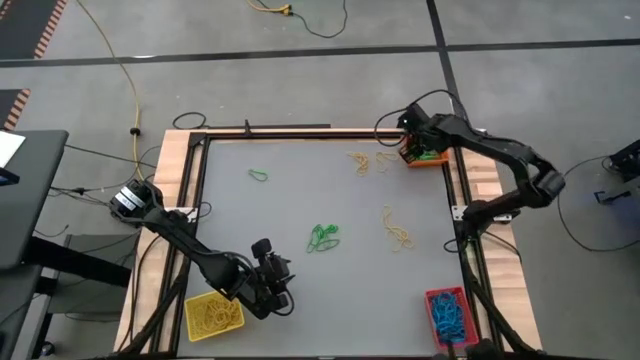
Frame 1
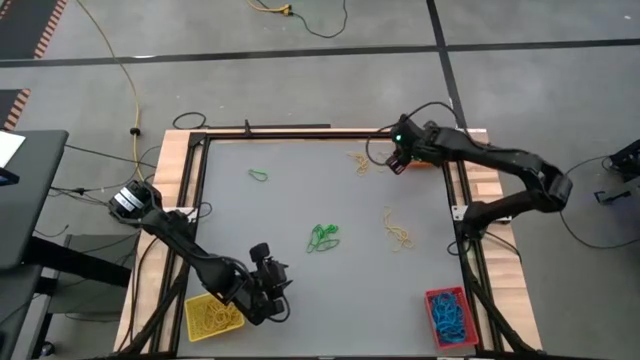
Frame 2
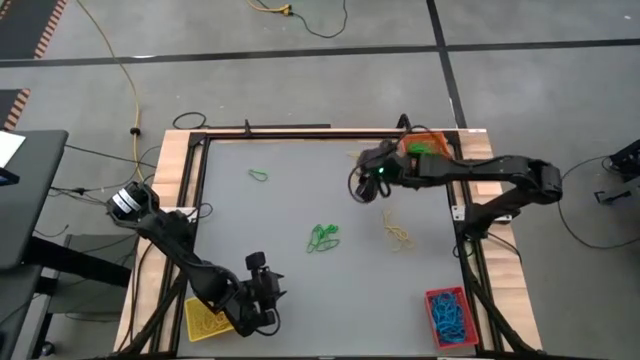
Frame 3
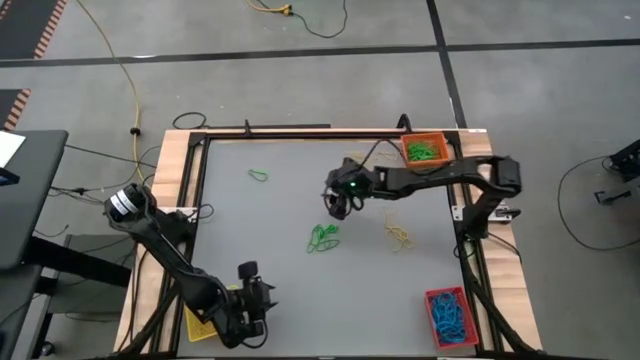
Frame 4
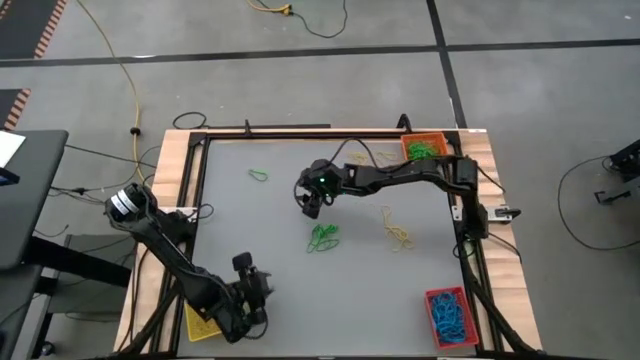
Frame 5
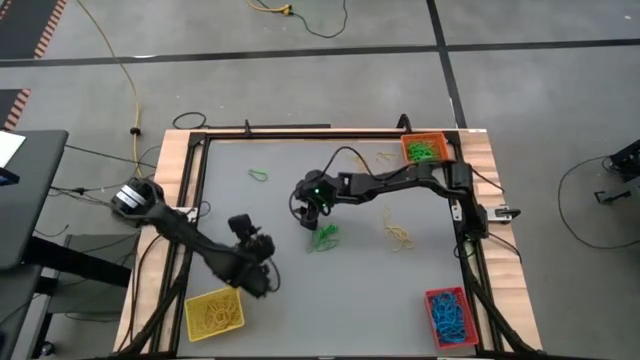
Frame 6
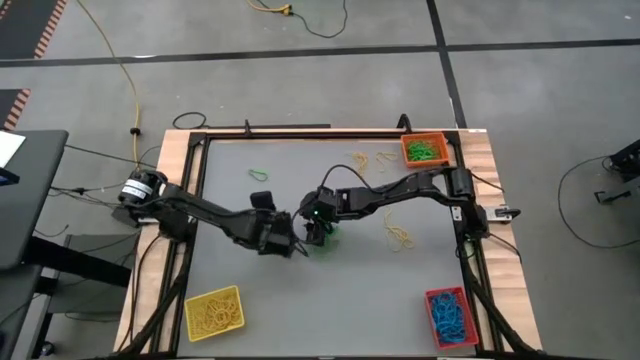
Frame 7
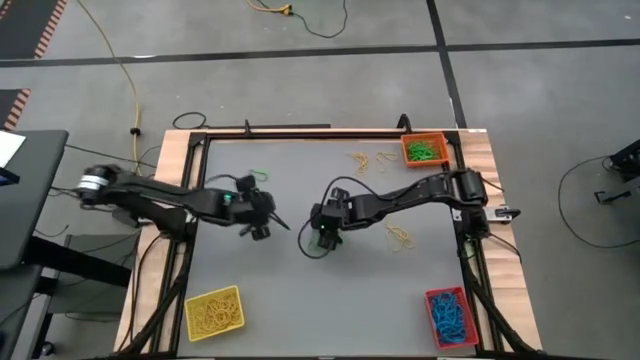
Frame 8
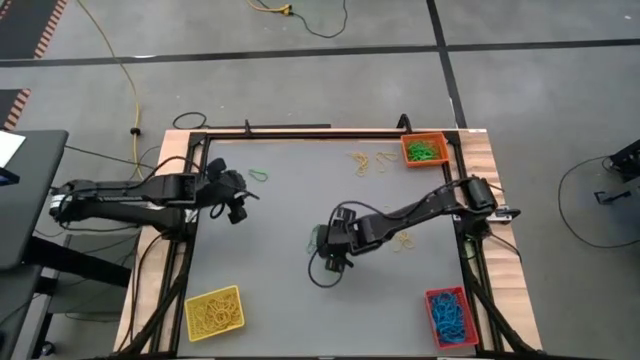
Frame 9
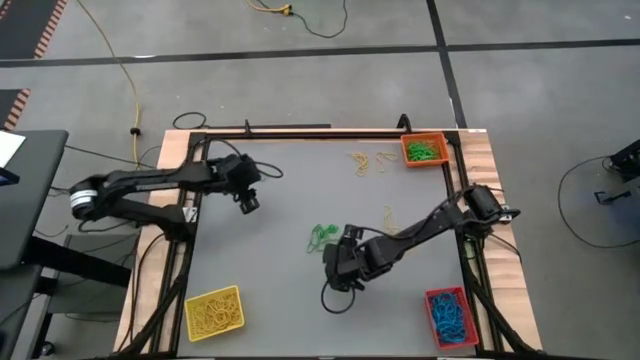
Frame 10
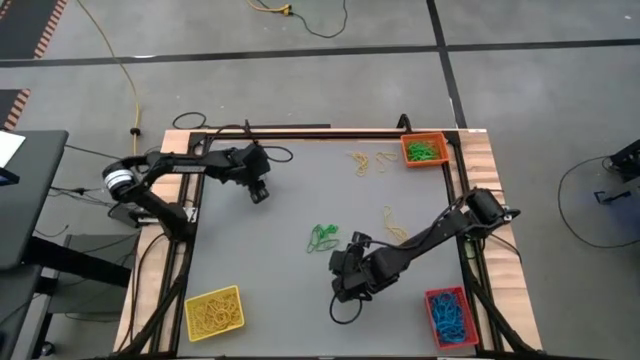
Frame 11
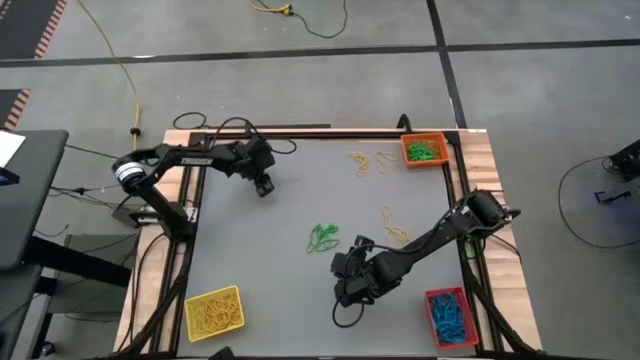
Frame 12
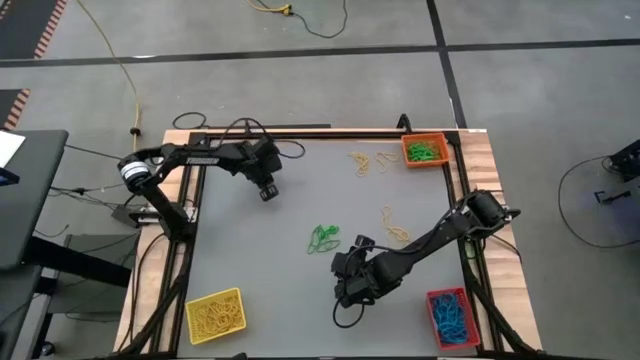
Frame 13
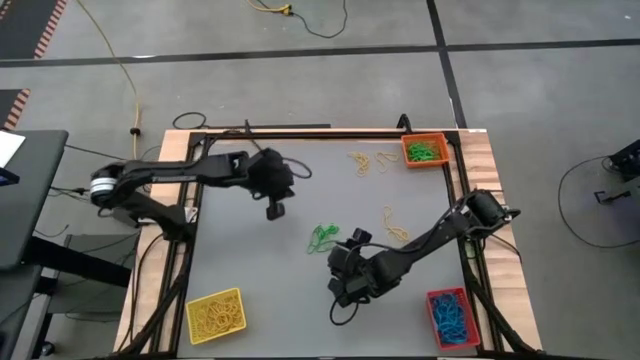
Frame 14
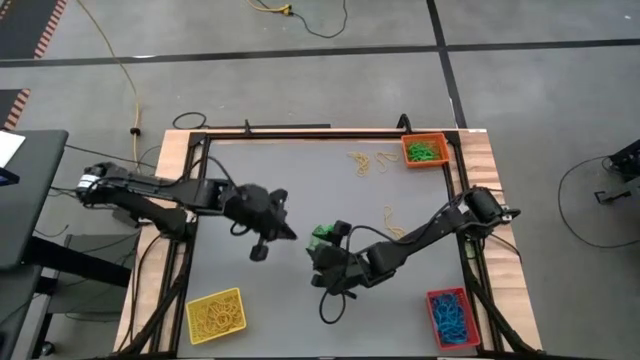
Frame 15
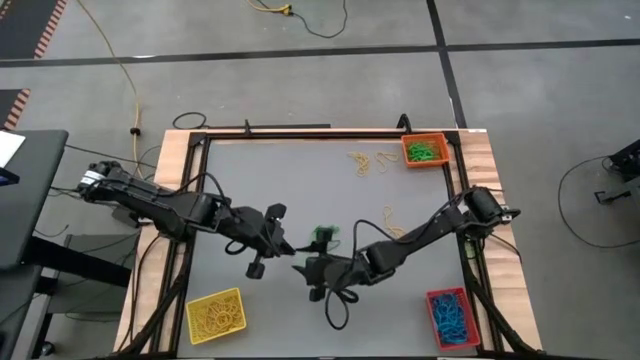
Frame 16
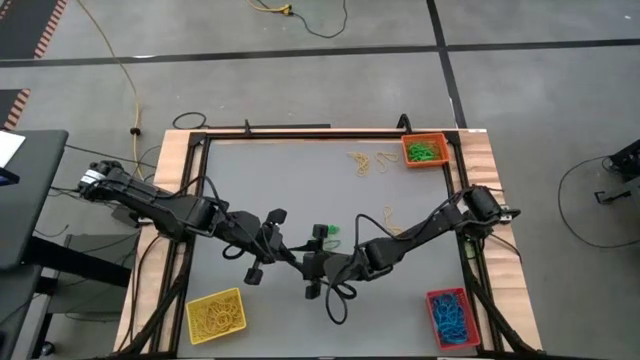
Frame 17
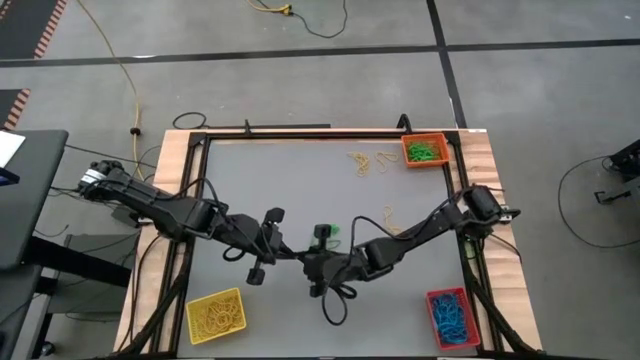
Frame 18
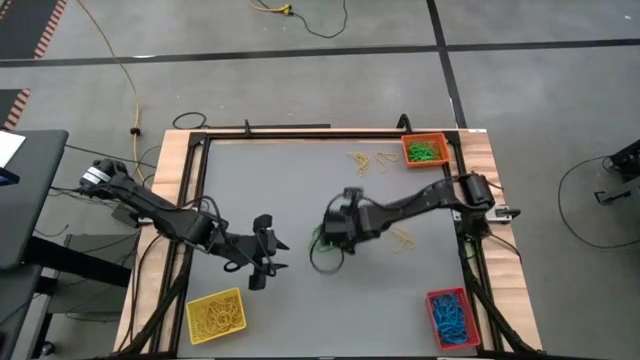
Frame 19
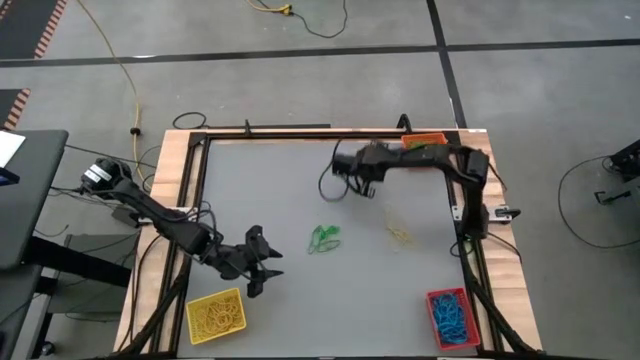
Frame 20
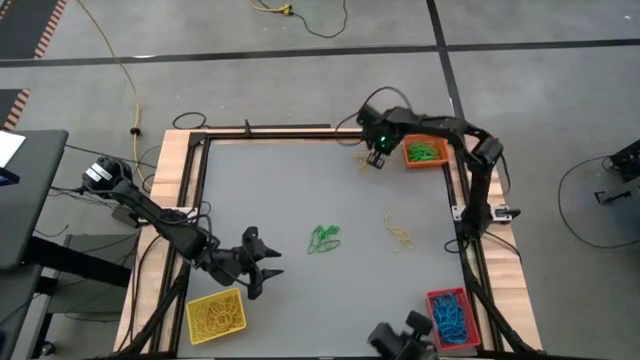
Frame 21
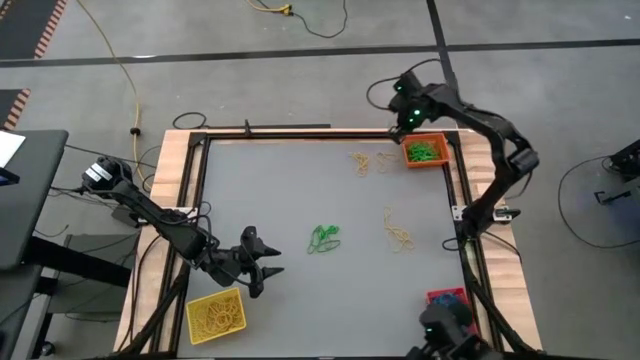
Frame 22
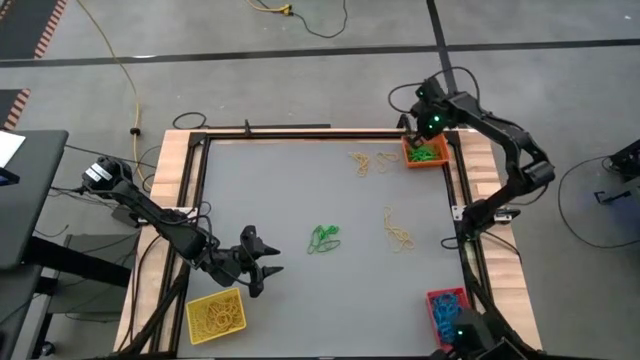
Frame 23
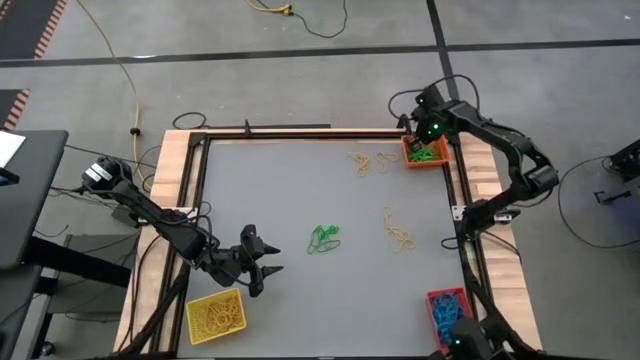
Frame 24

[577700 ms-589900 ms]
Task: Sort rubber bands into baskets
Put the green rubber band into the orange bin

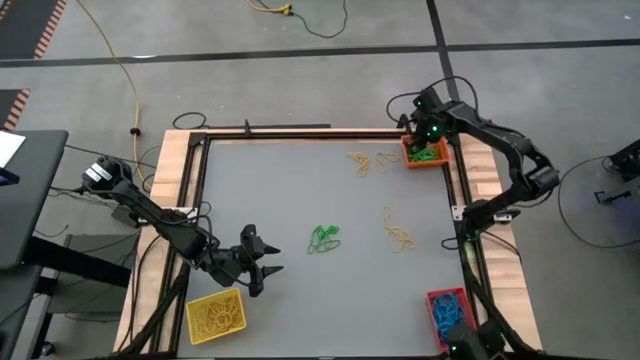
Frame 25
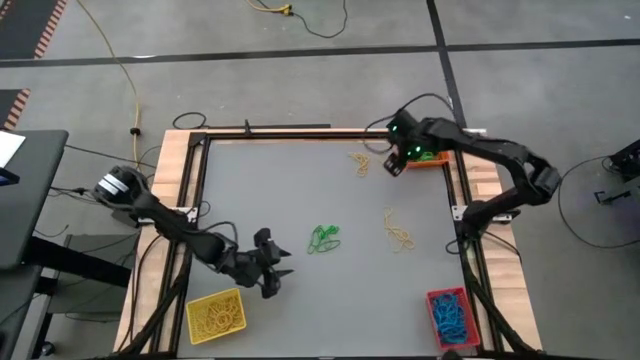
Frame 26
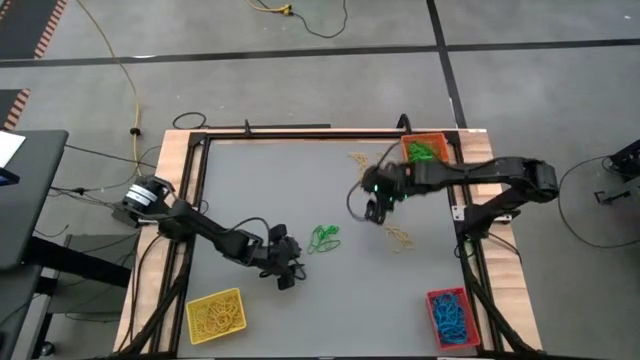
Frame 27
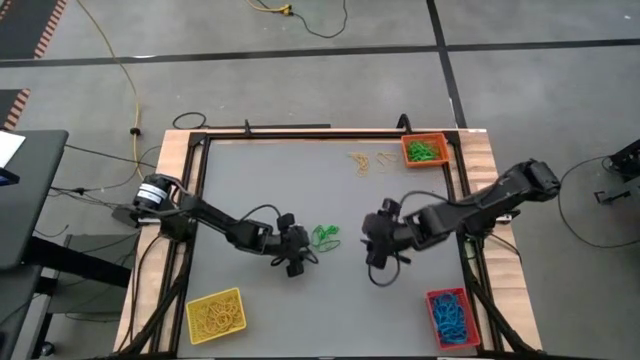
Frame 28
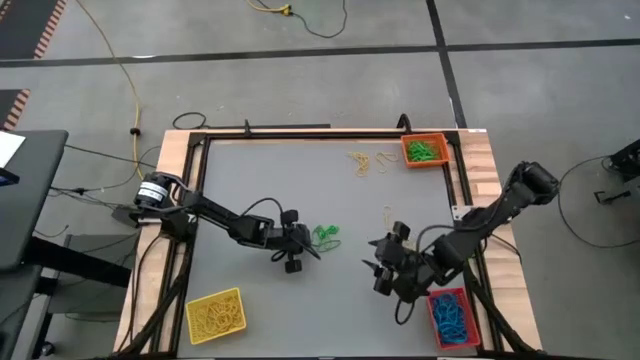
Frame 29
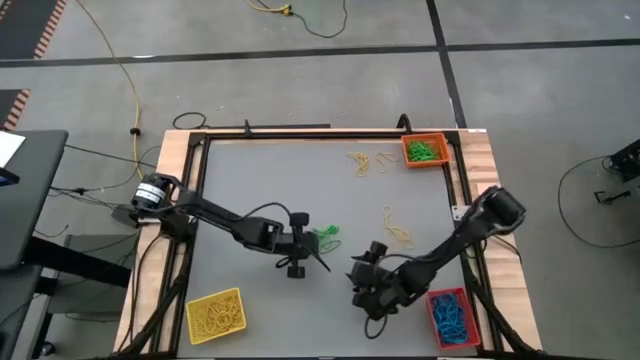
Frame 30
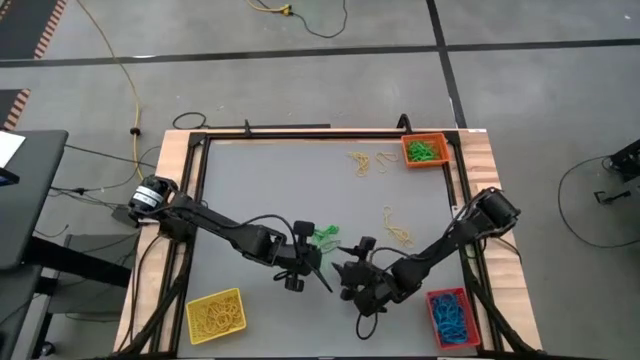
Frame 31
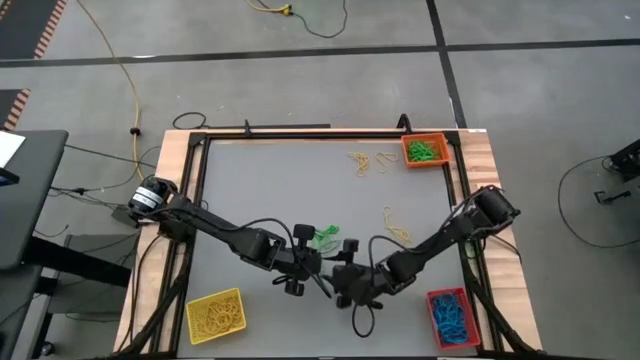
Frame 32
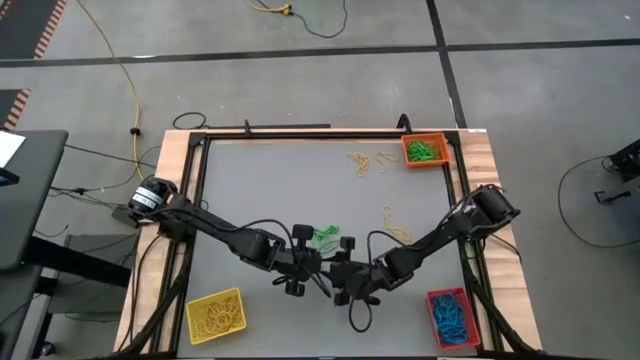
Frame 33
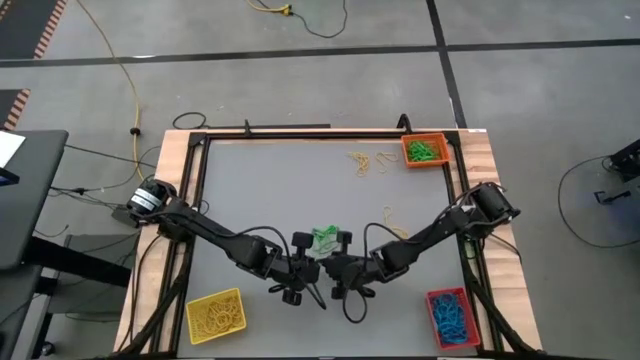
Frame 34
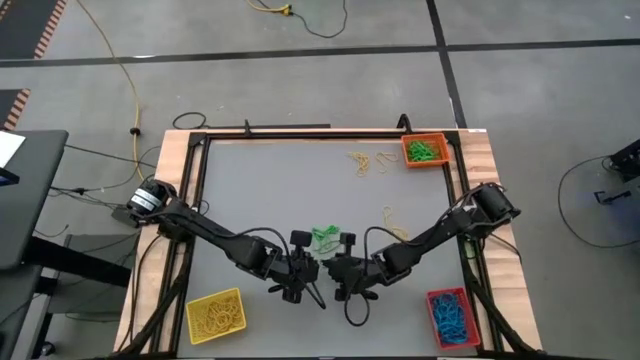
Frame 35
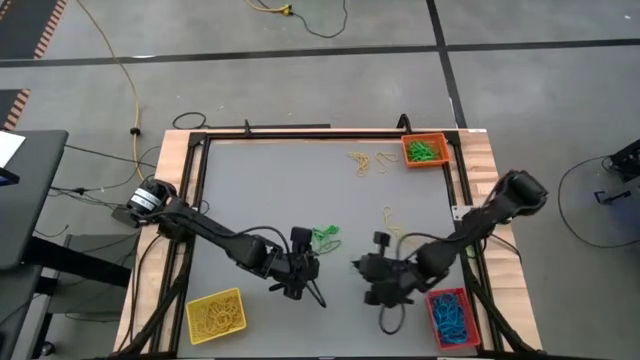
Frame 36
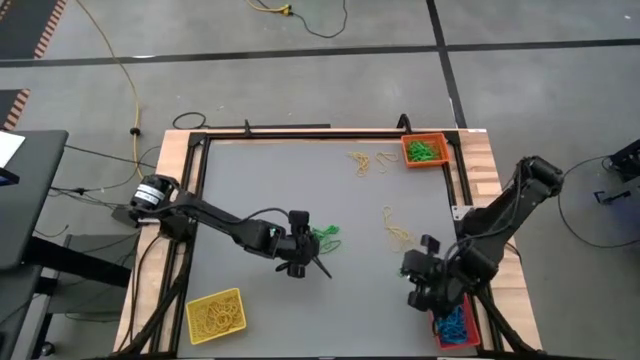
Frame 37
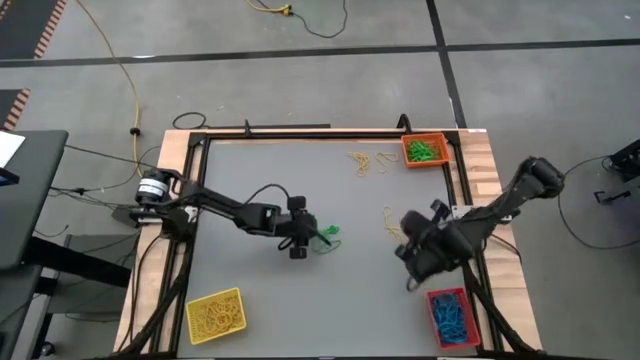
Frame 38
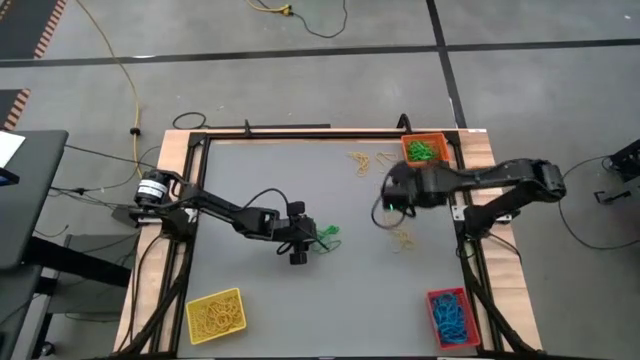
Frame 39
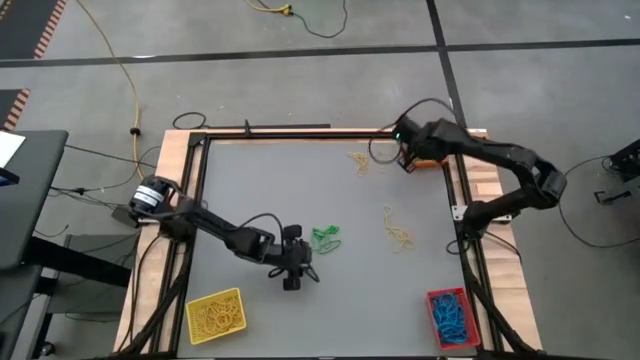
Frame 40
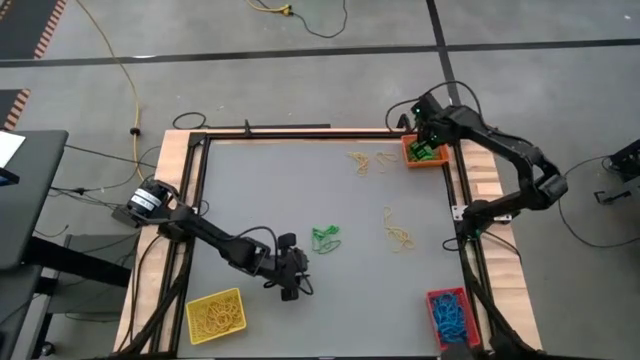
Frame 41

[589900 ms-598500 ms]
Put the green rubber band into the orange bin
